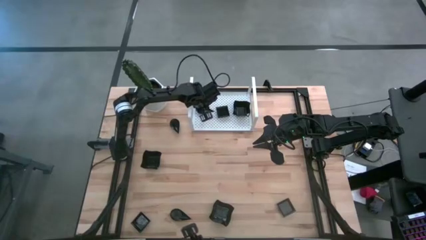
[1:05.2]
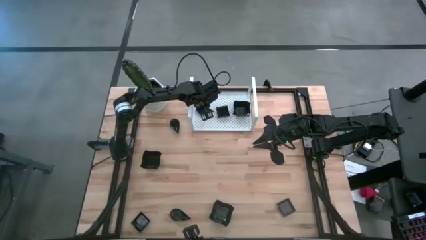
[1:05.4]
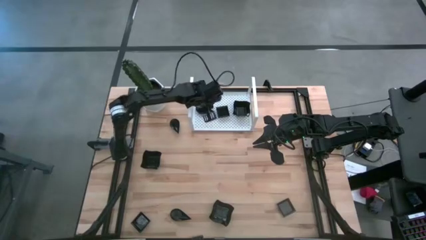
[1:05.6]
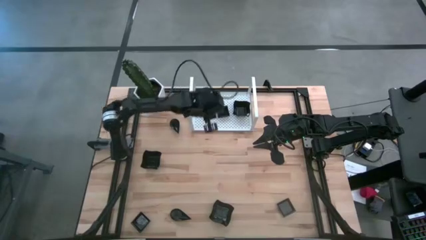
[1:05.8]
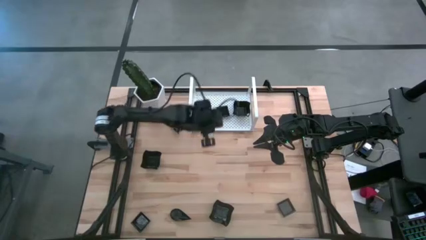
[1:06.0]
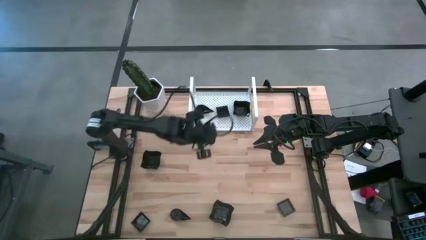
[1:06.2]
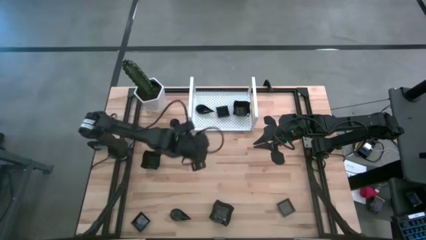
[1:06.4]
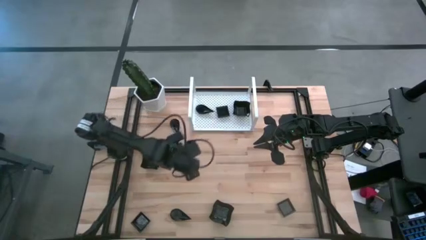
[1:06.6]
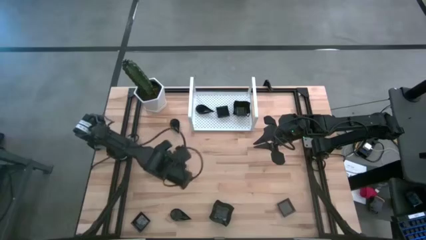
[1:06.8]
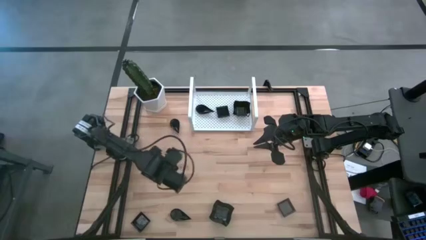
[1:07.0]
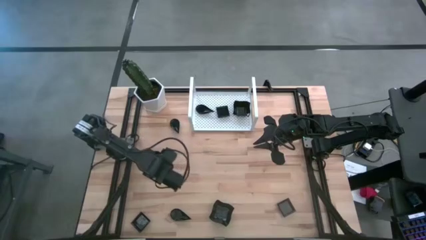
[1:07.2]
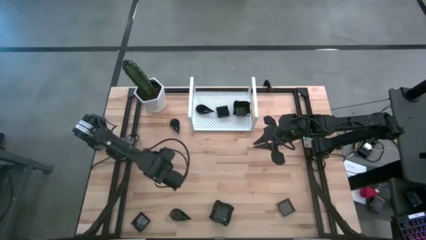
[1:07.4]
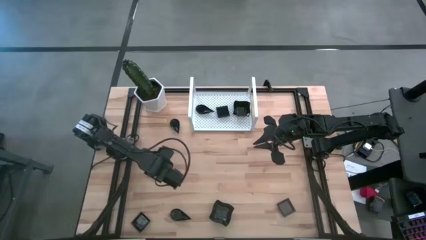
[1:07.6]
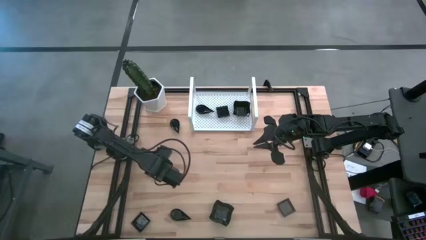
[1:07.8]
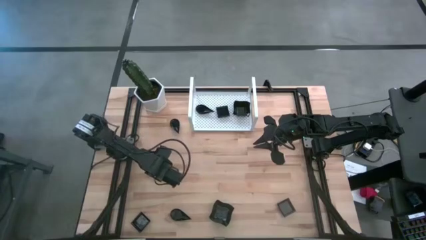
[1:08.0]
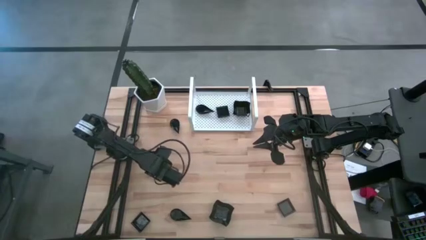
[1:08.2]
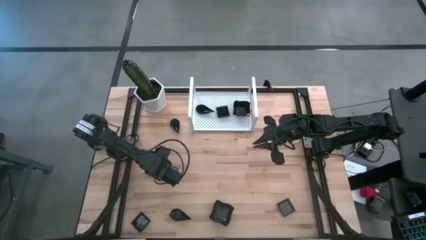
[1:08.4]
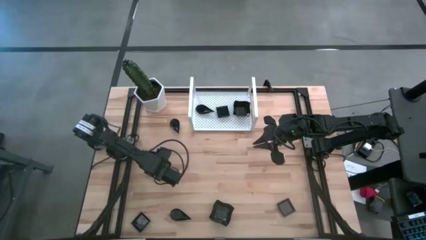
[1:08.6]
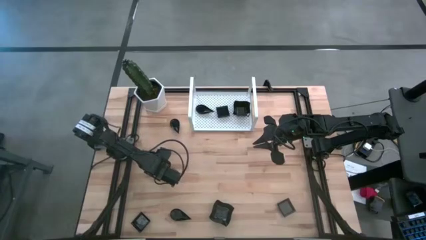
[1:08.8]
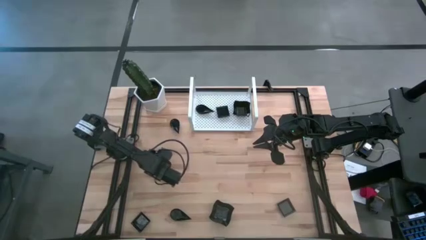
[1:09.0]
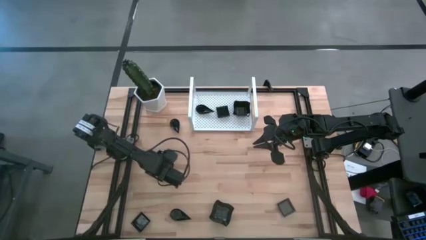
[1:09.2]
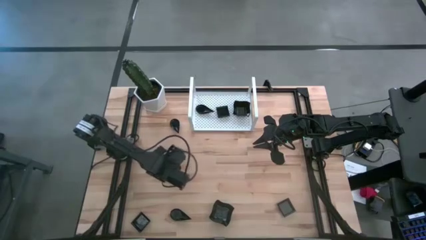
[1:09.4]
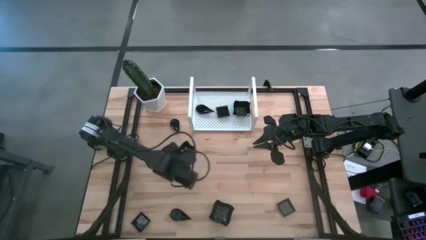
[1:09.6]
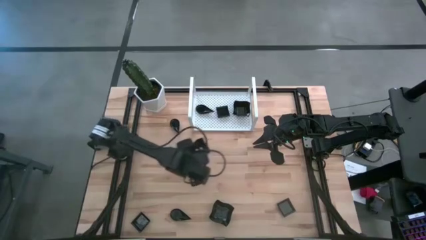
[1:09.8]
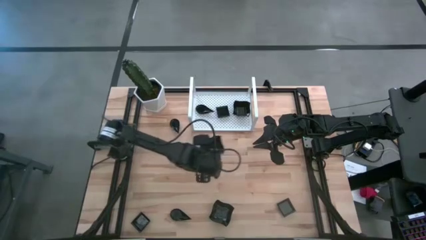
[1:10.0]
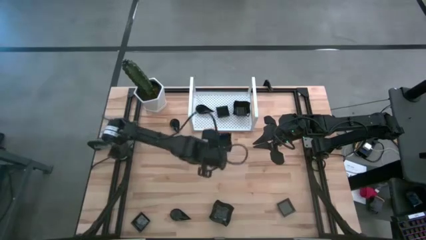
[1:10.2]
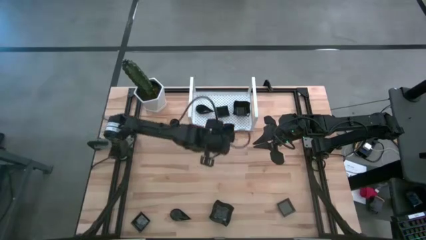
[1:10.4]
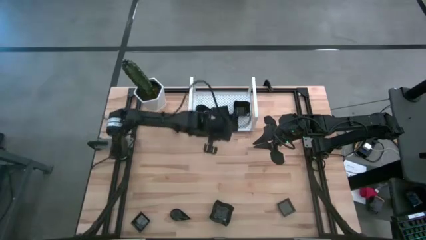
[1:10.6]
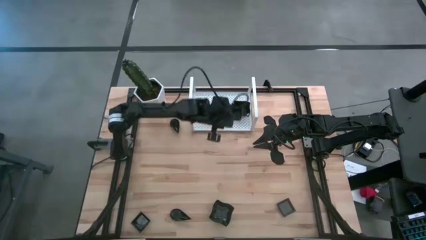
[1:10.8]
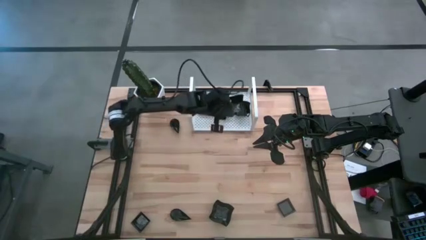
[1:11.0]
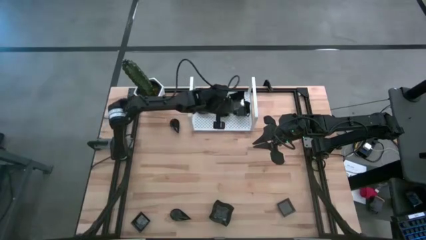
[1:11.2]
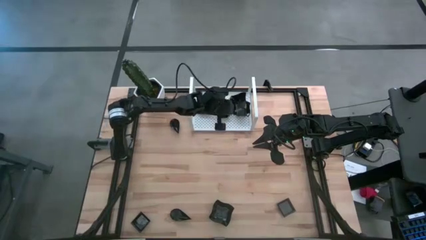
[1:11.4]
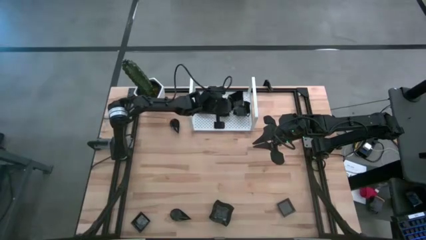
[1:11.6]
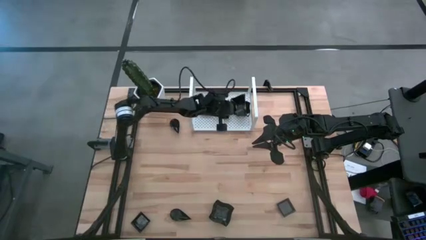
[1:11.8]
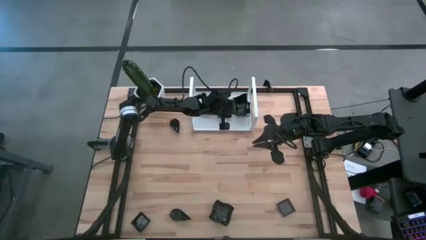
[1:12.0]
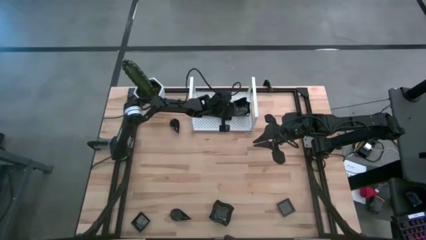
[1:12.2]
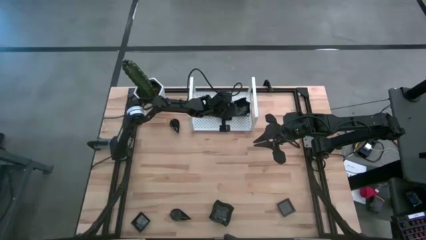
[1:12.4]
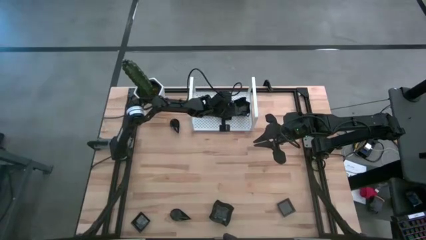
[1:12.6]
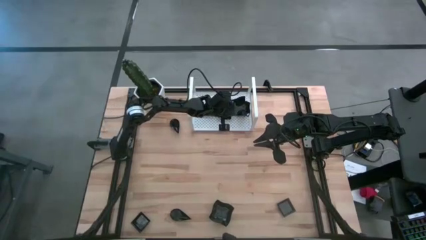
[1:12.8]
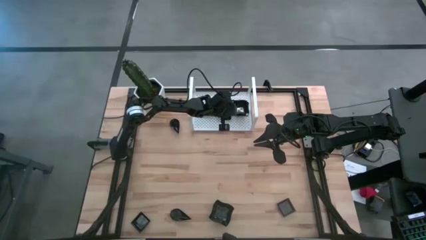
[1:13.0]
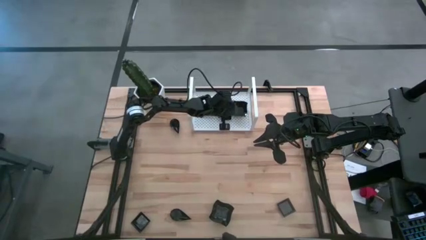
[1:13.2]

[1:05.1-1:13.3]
Task: Pick & Place Mini shaped plates
Stack the black distorted square plate on top of the black distorted square plate on the shelf

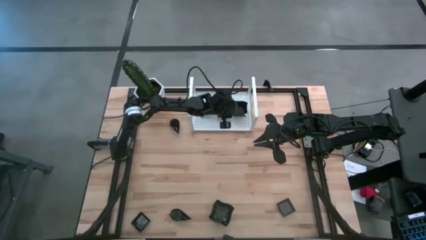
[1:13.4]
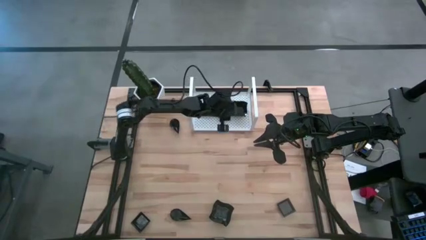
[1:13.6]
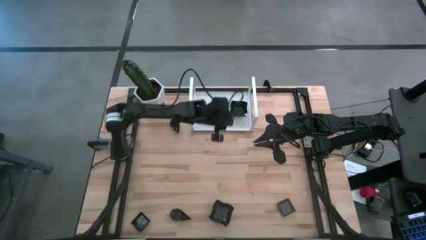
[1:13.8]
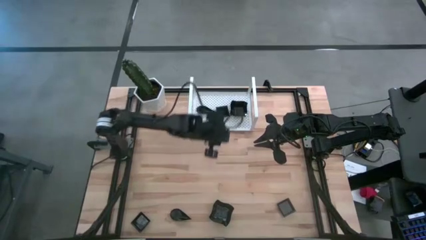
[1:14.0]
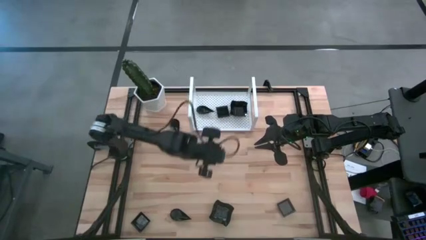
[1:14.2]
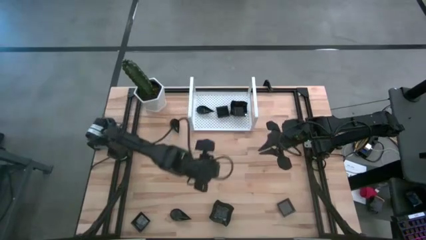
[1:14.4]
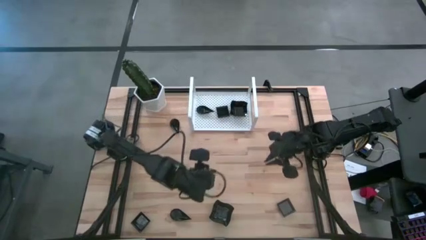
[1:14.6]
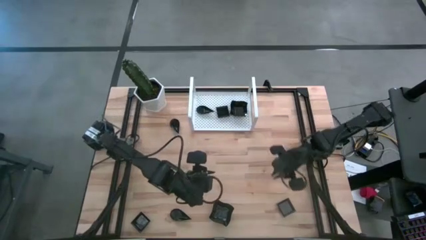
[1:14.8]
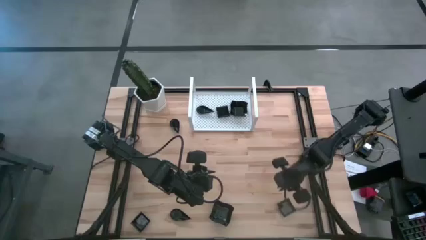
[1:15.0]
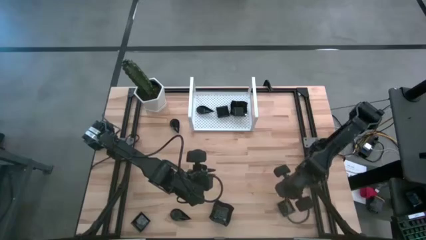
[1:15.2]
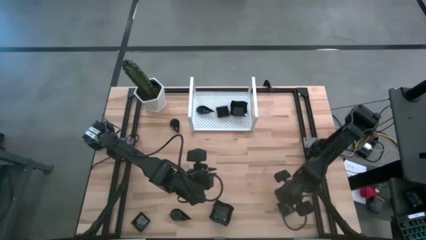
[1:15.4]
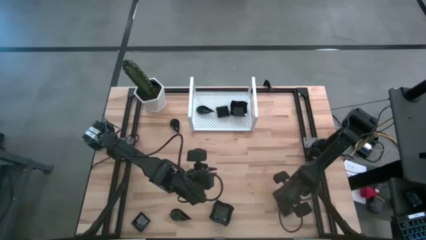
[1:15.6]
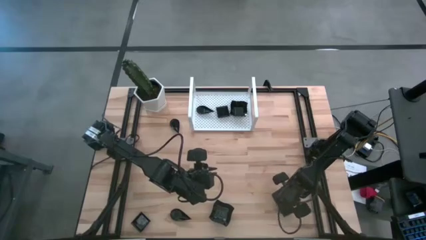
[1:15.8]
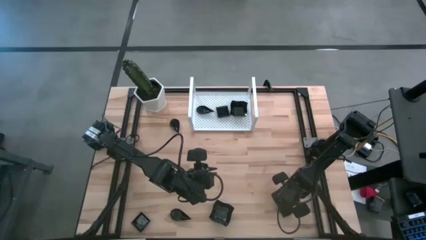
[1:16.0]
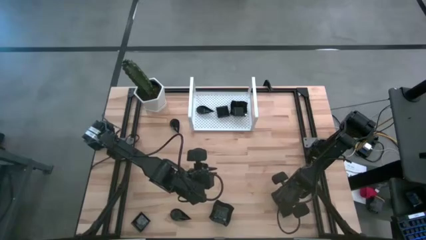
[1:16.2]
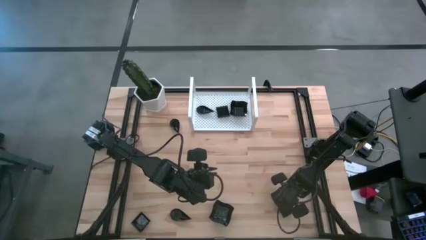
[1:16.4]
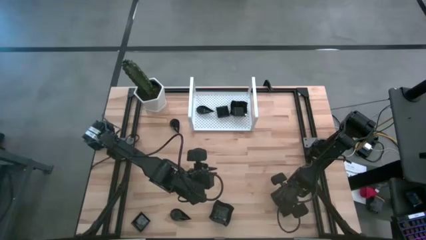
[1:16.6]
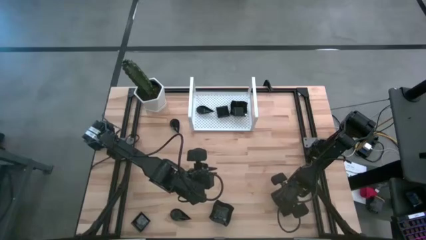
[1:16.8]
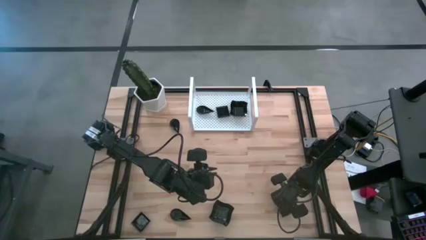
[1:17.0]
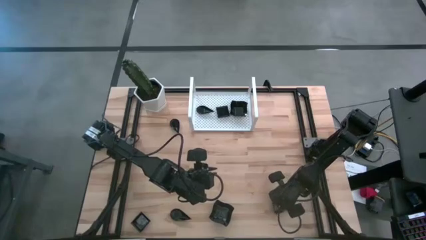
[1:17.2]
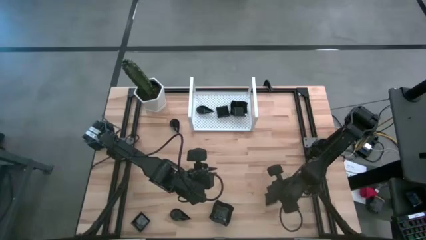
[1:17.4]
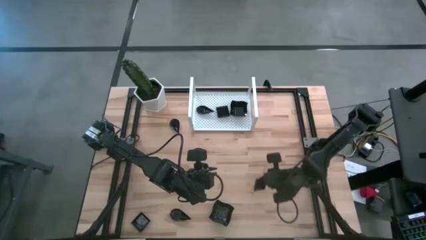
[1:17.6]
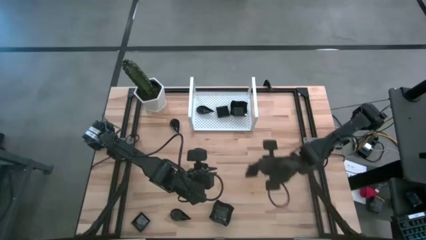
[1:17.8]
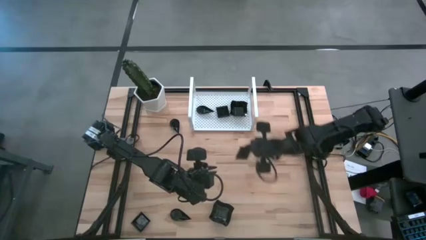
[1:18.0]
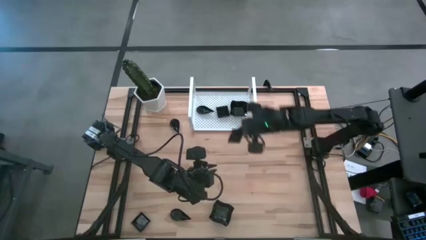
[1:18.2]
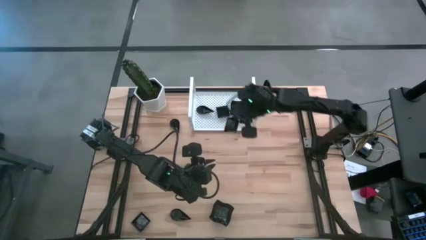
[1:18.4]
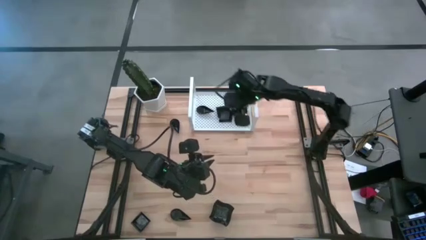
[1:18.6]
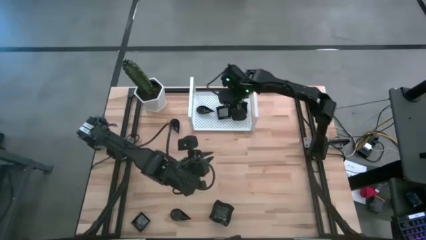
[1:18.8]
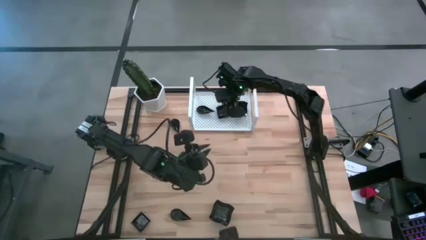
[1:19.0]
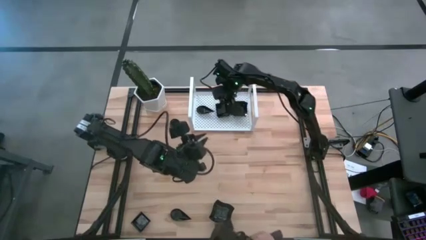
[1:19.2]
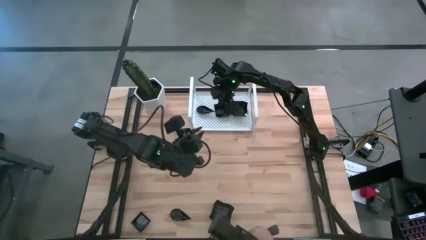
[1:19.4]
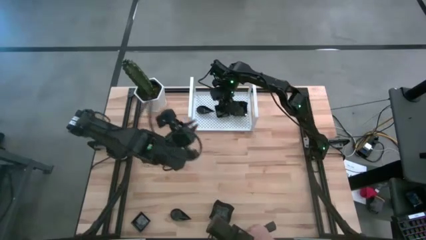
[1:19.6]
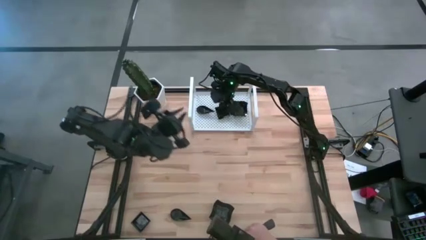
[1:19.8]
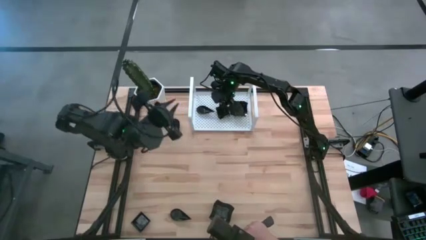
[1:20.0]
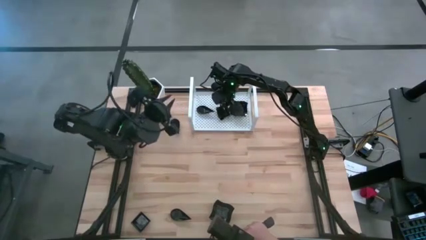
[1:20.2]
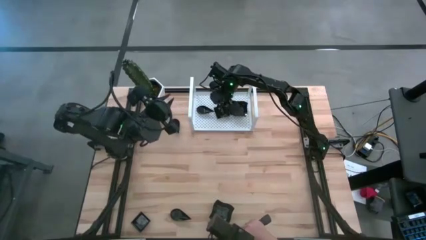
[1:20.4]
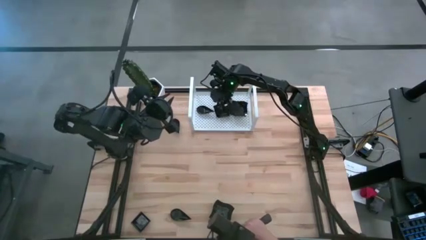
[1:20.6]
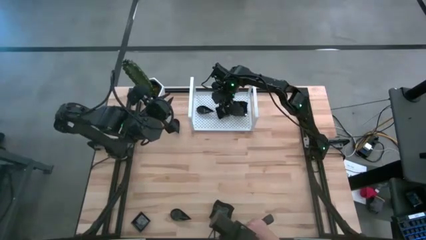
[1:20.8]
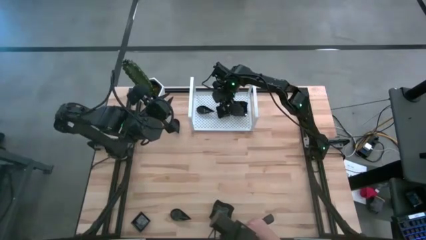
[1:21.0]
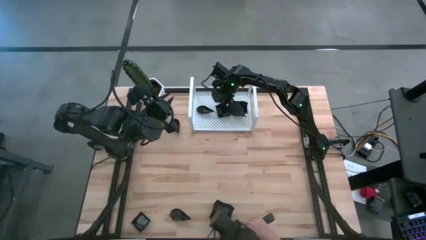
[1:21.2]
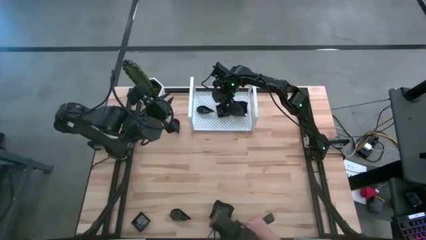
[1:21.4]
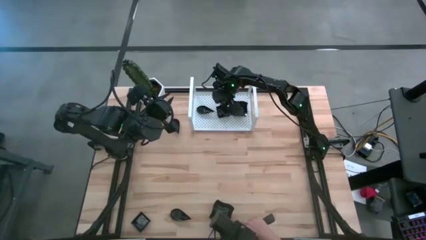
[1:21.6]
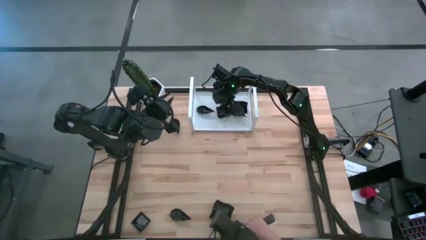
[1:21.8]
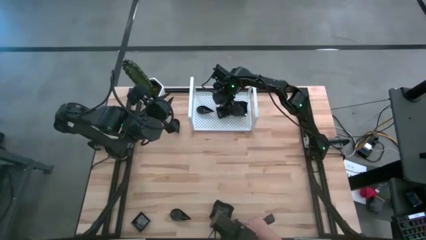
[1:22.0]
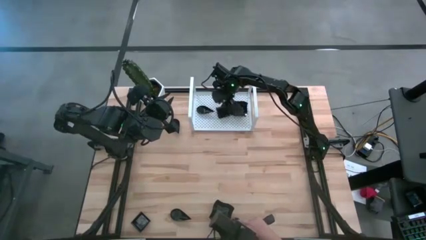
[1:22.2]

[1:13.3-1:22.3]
Stack the black square plate on top of the black square plate on the shelf
